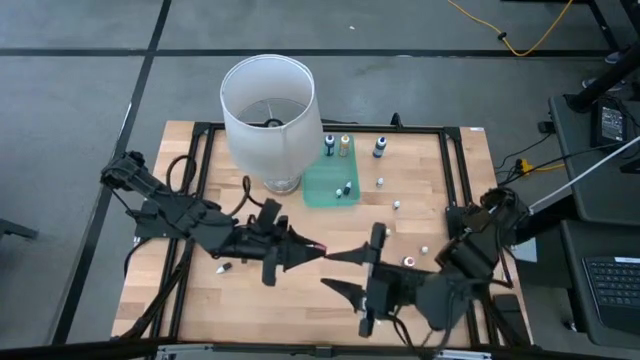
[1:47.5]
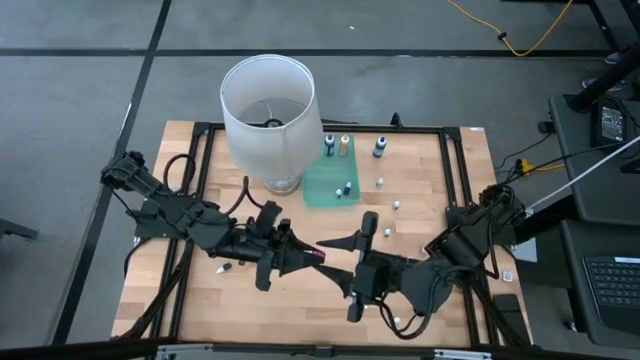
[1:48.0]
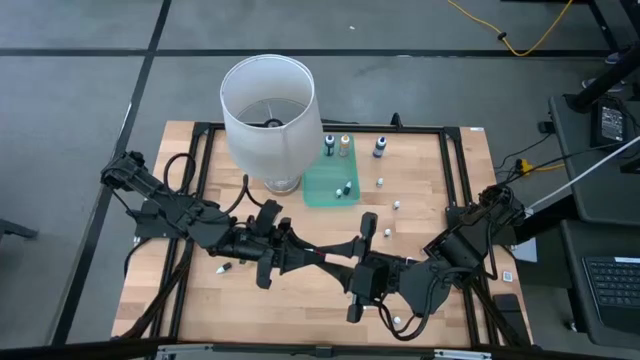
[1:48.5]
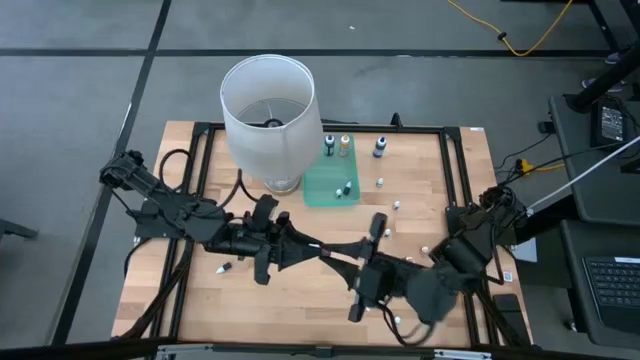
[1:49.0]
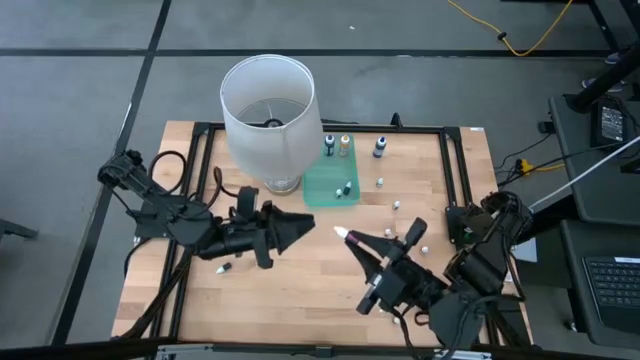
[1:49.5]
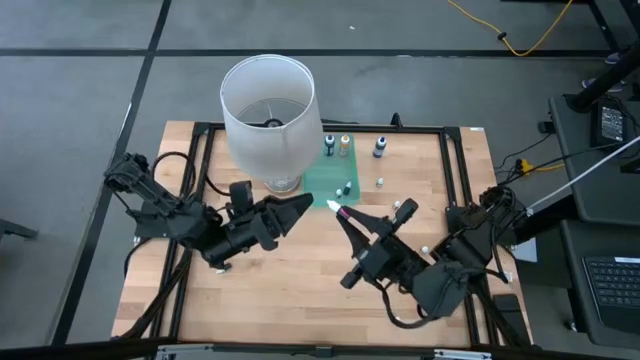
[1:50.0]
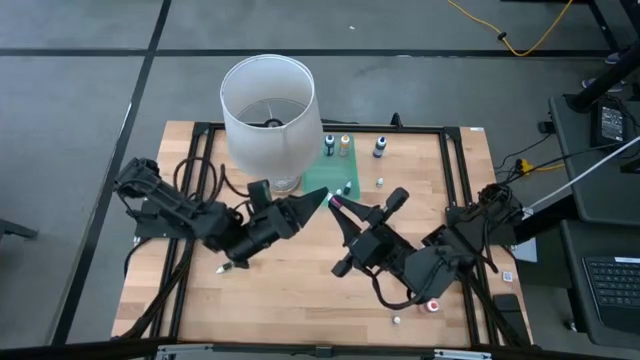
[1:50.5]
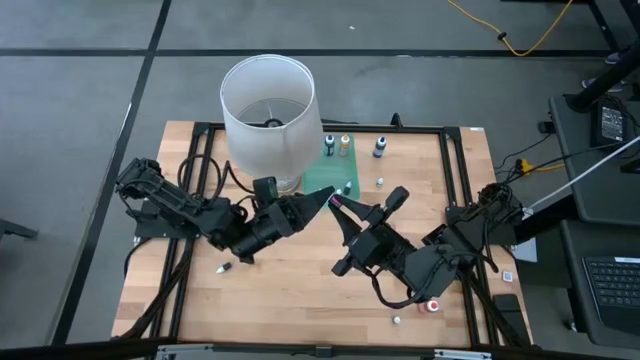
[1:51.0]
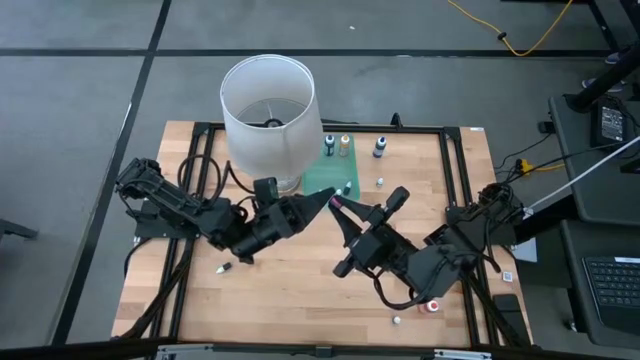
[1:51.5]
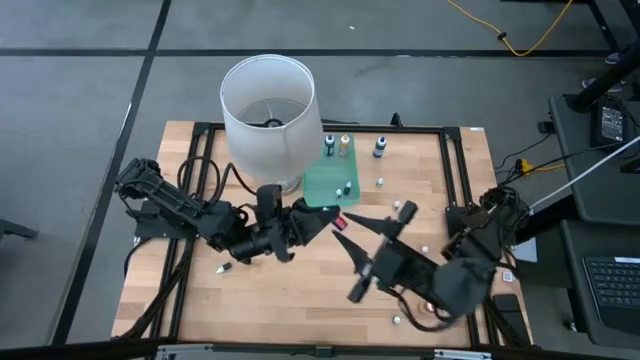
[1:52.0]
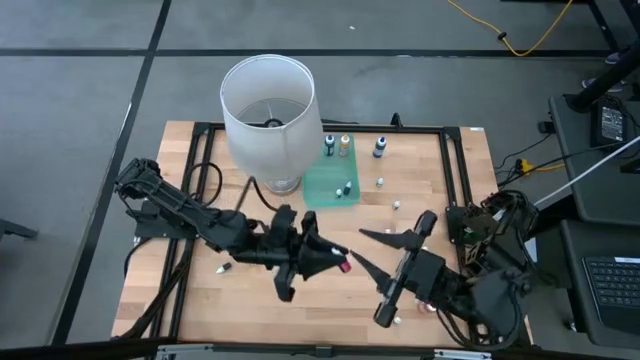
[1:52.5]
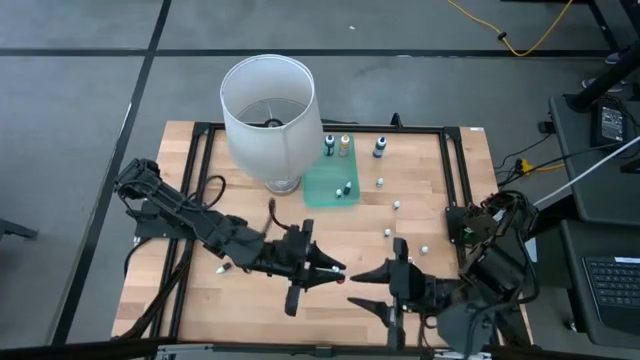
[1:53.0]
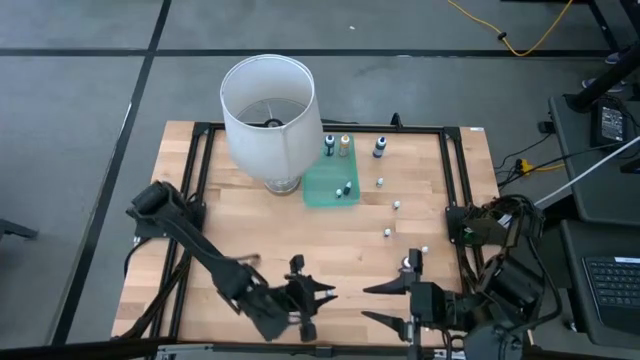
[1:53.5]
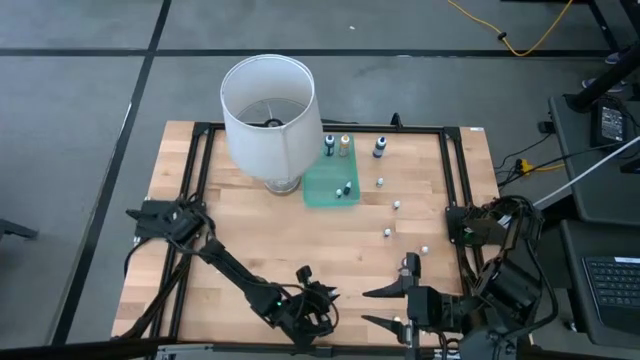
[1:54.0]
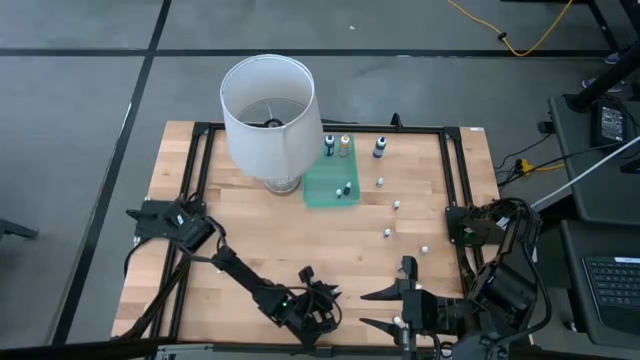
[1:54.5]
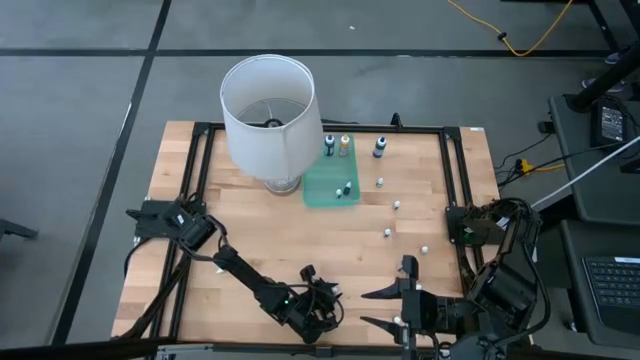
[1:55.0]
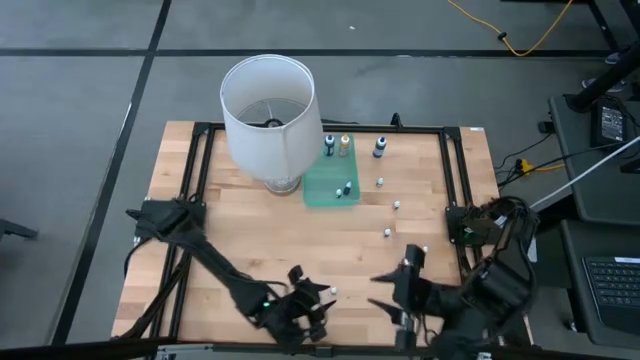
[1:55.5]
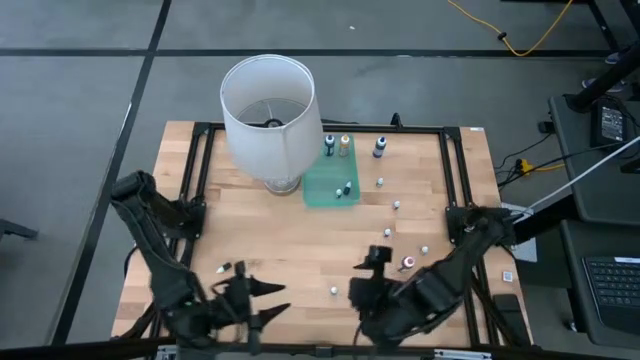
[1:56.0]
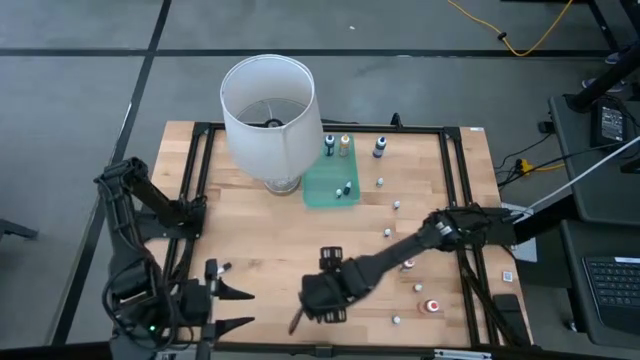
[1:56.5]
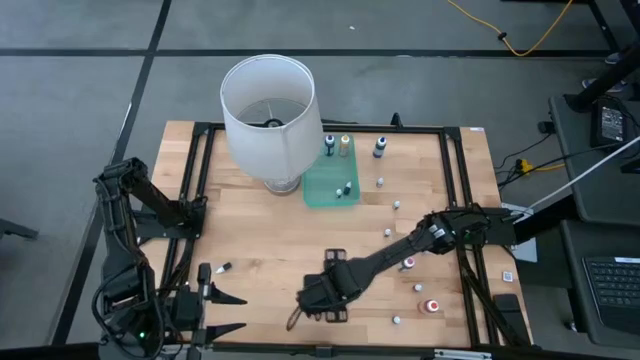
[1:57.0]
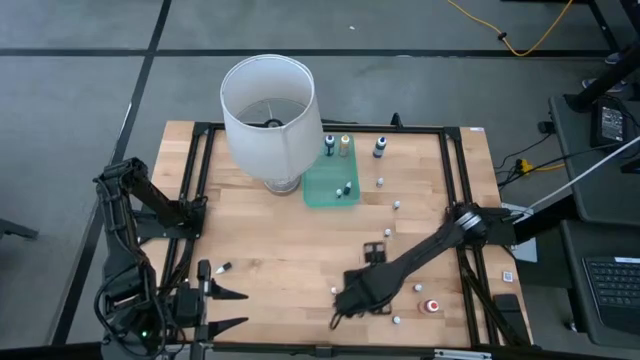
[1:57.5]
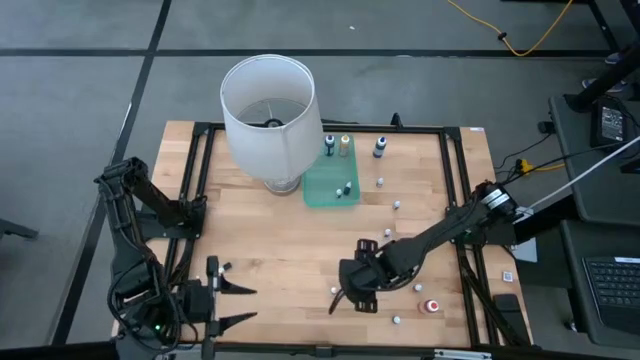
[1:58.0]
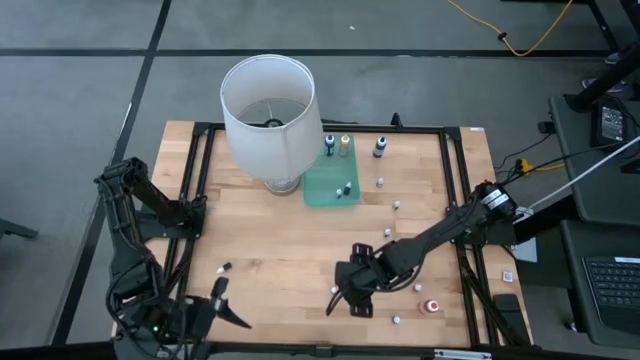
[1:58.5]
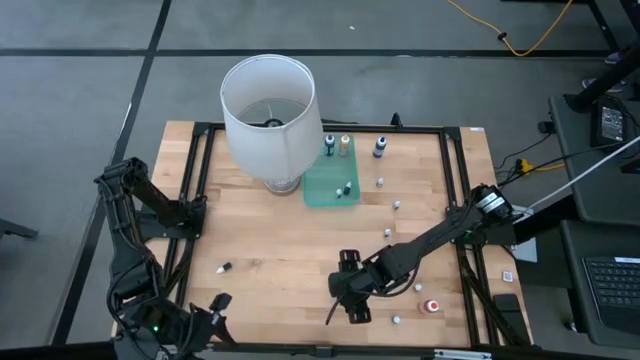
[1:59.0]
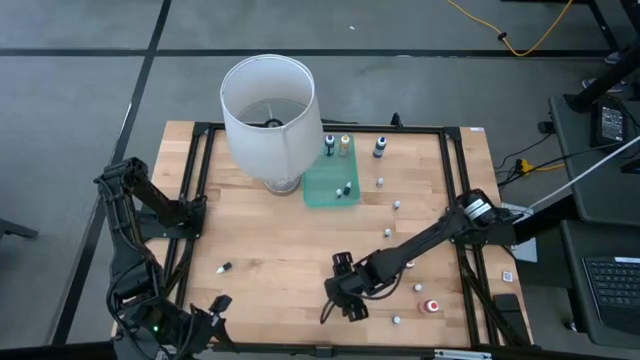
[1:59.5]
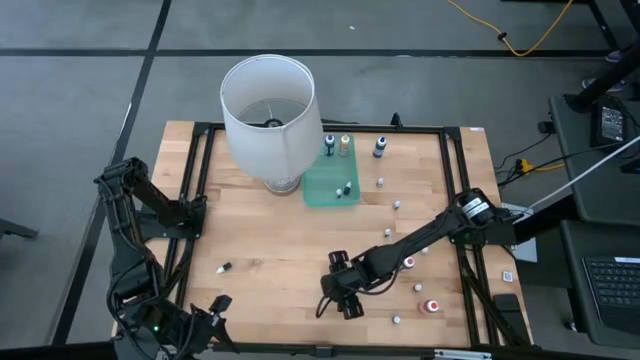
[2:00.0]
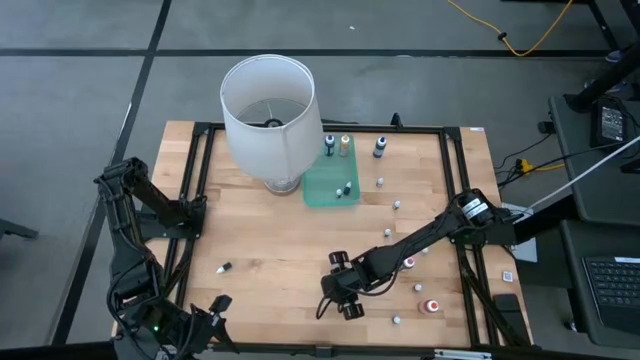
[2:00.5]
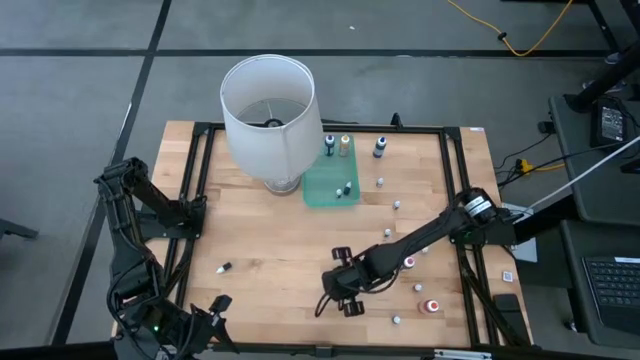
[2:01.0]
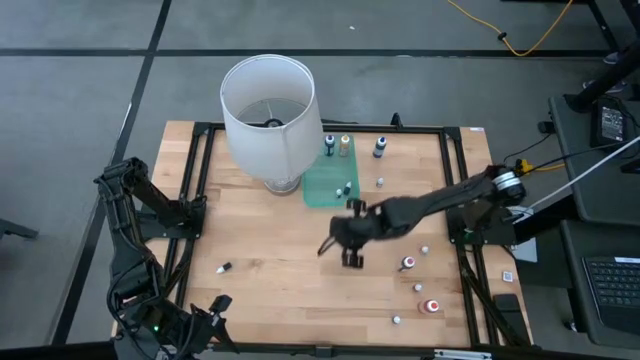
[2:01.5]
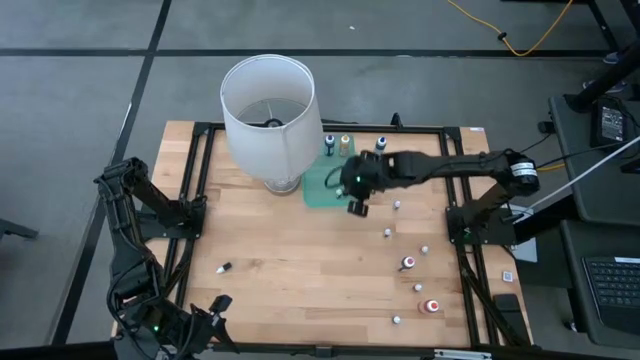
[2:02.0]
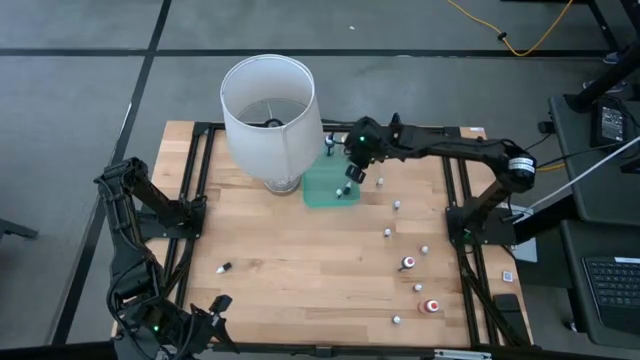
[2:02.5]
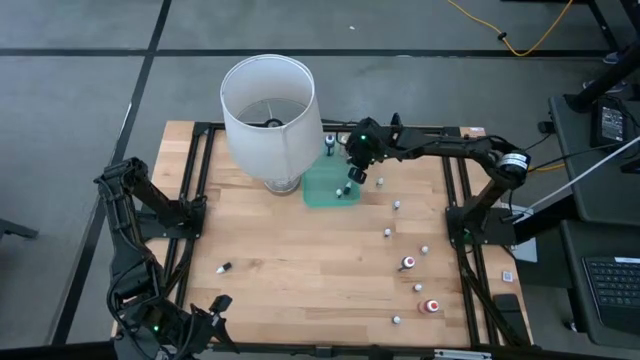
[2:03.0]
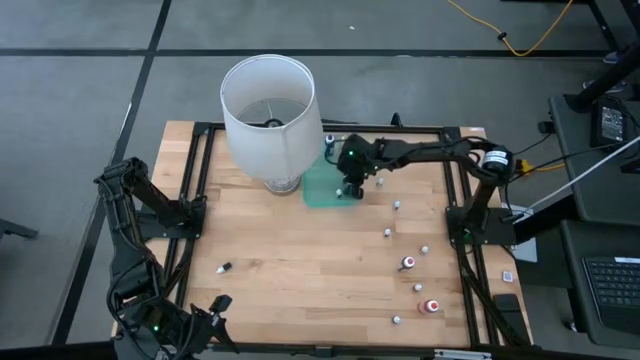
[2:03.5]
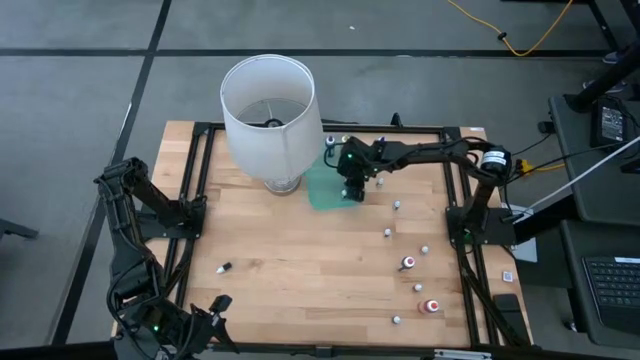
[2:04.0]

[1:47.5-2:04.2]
Task: Pick & Place food coloring
Put the top left small red food coloring bottle into the green bin

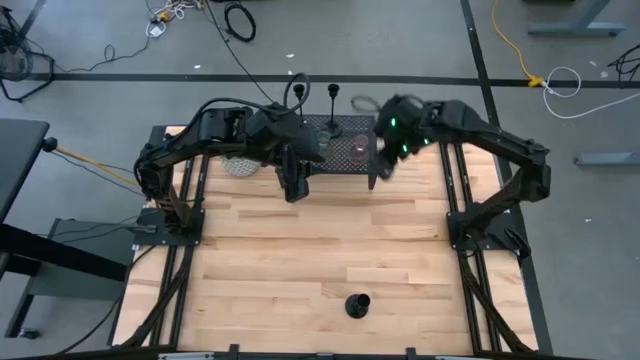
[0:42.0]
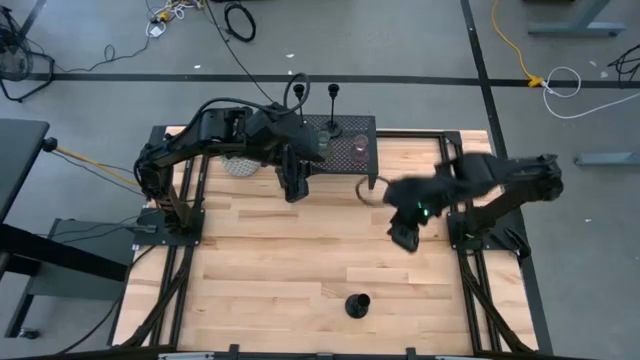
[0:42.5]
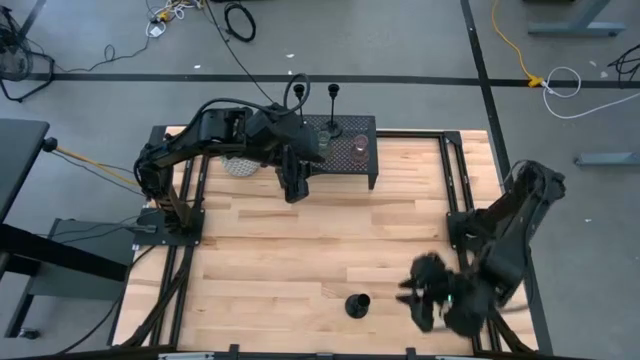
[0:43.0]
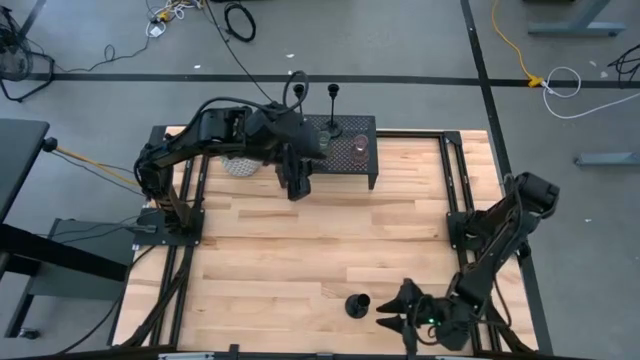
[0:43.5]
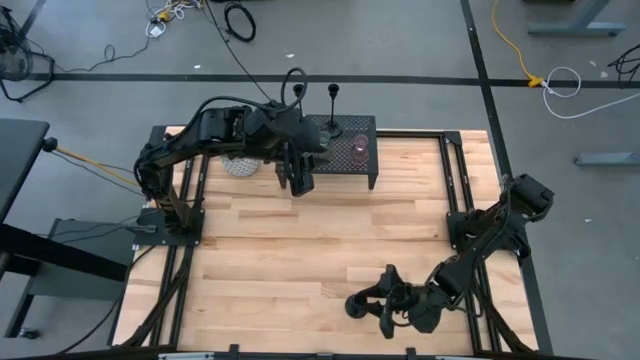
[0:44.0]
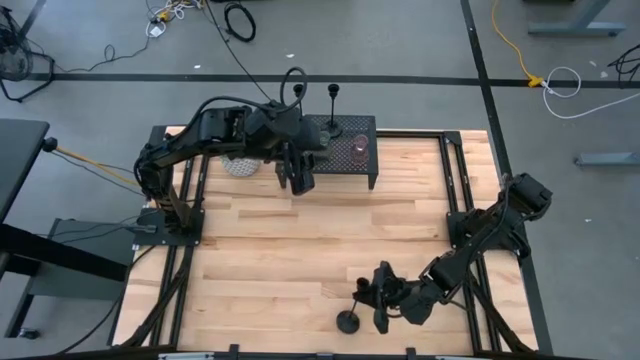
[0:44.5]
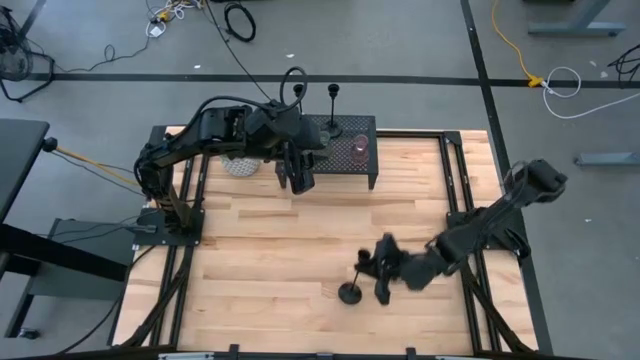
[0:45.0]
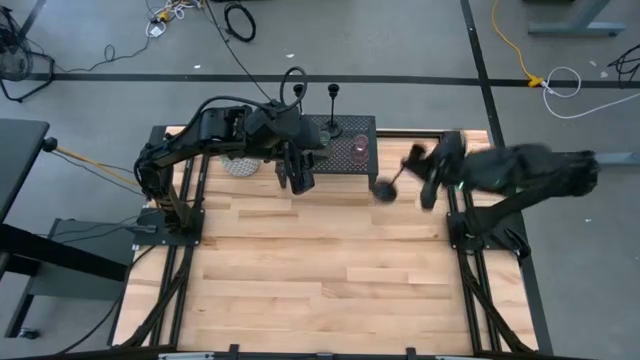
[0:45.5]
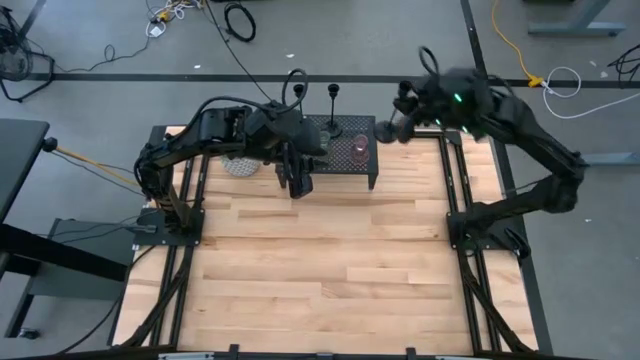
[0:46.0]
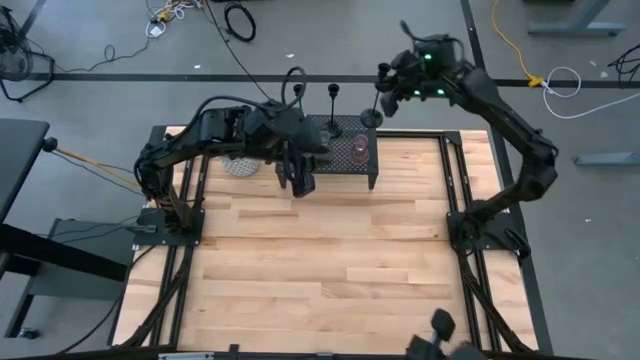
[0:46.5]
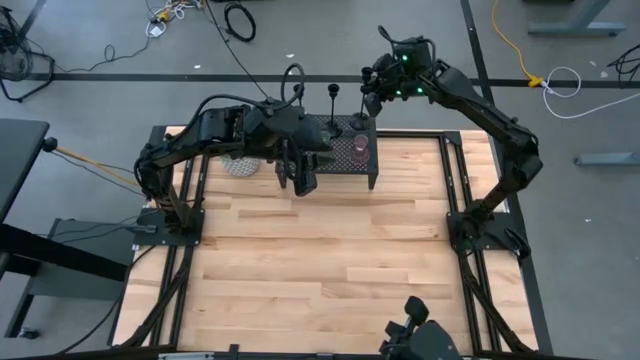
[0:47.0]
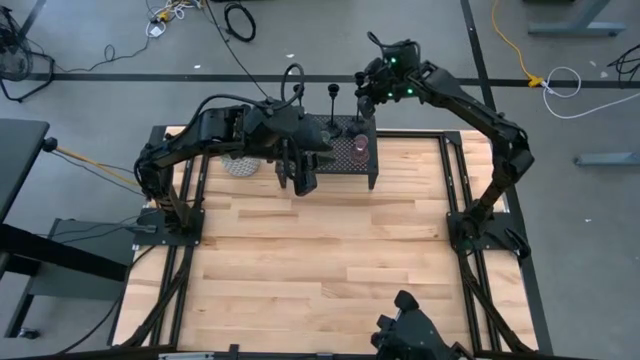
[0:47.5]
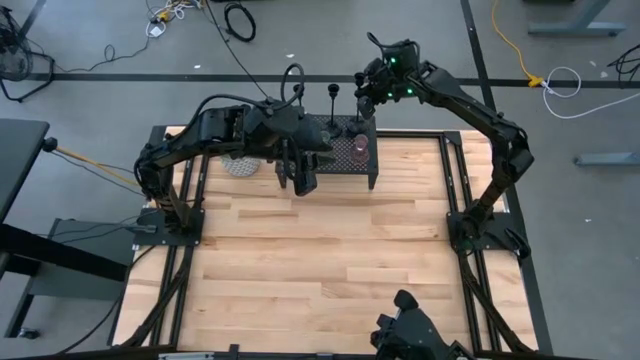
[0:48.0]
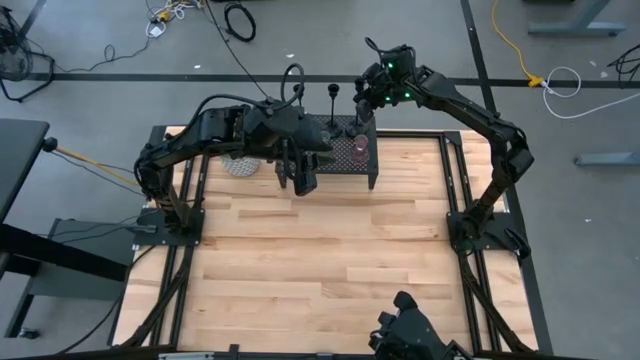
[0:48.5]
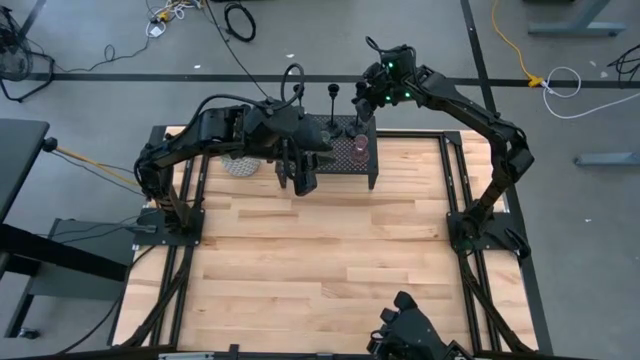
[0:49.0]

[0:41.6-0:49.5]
Task: Pick & Place candle stick holders
Put the black candle holder on the shelf aligned with the other black candle holders
